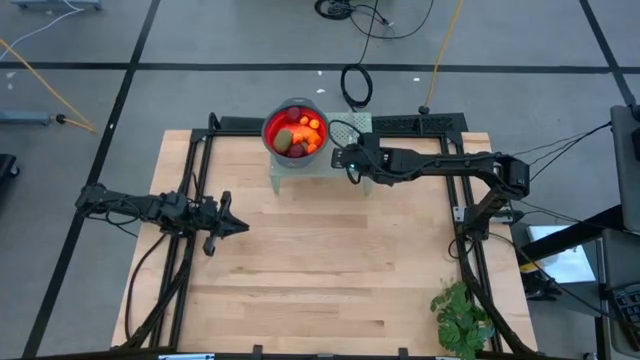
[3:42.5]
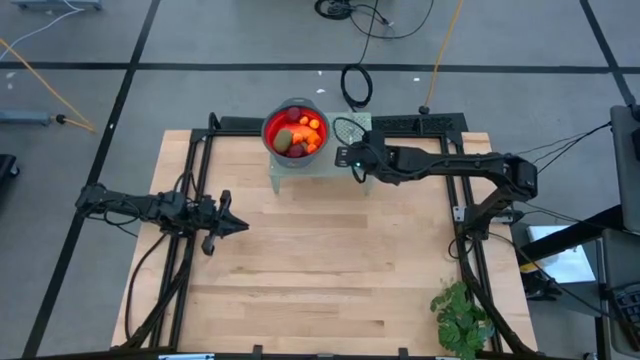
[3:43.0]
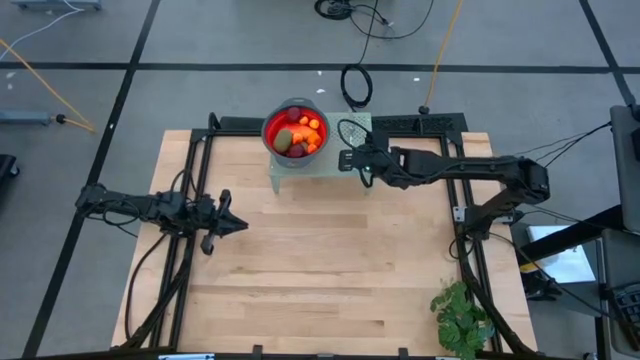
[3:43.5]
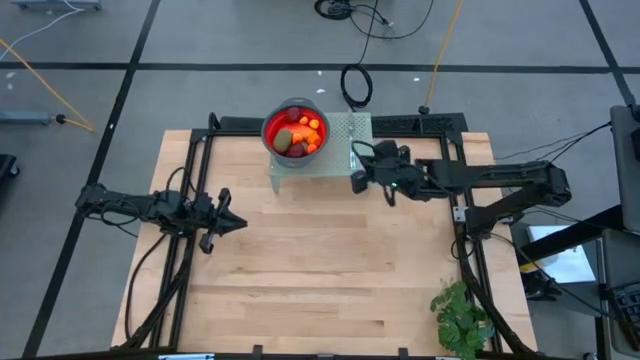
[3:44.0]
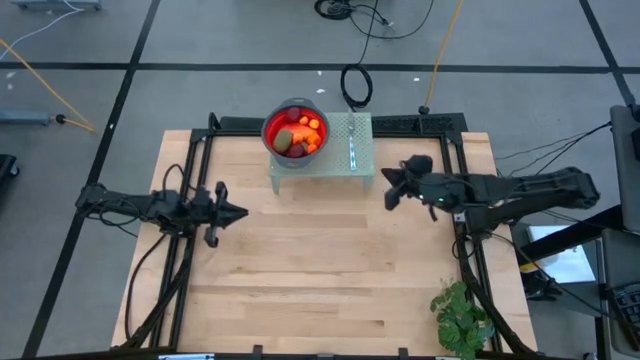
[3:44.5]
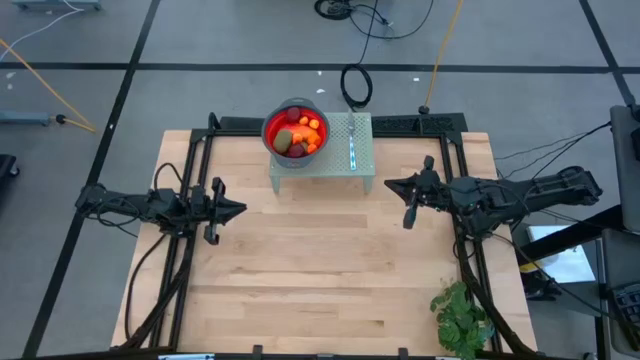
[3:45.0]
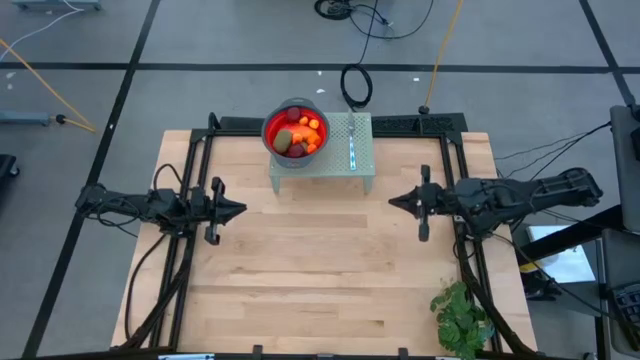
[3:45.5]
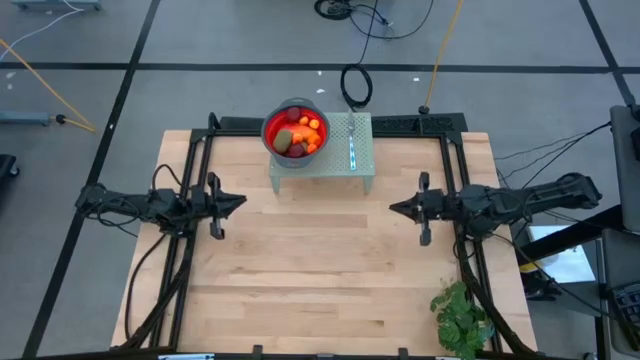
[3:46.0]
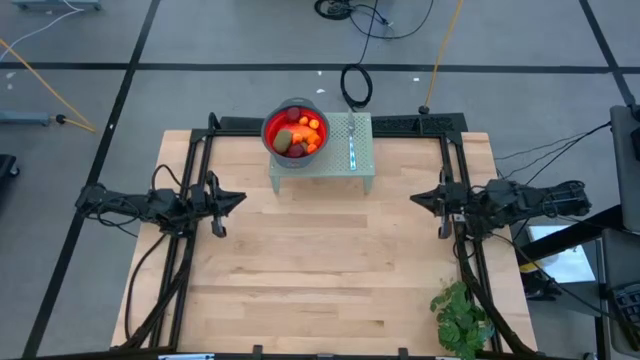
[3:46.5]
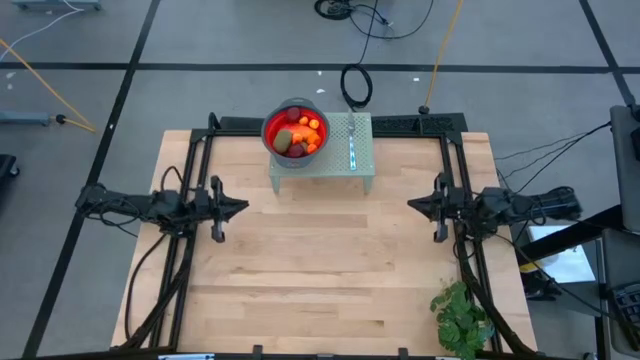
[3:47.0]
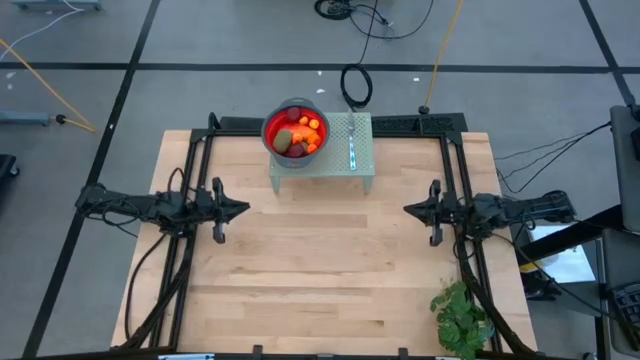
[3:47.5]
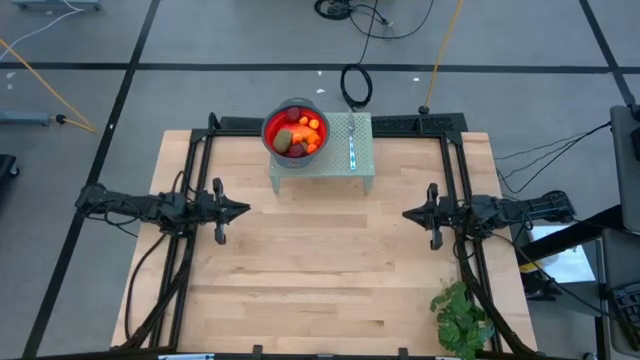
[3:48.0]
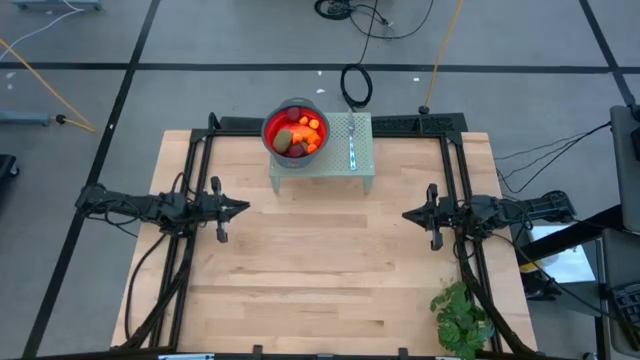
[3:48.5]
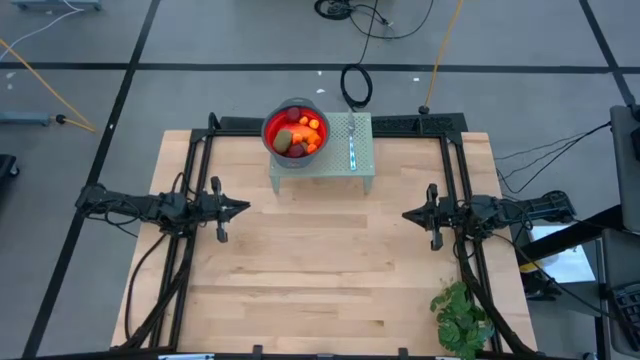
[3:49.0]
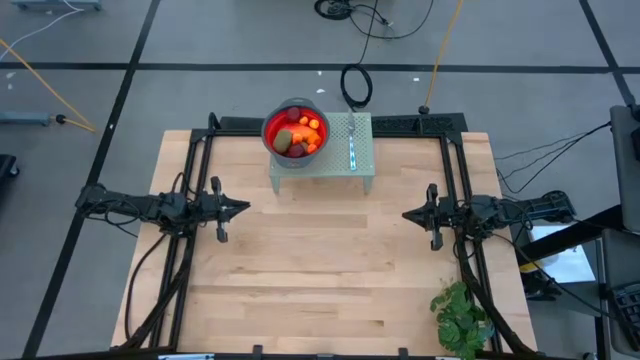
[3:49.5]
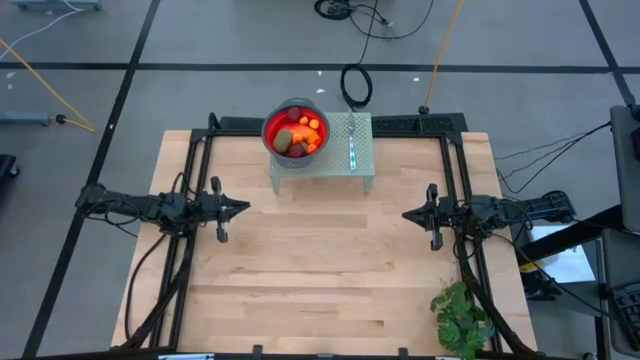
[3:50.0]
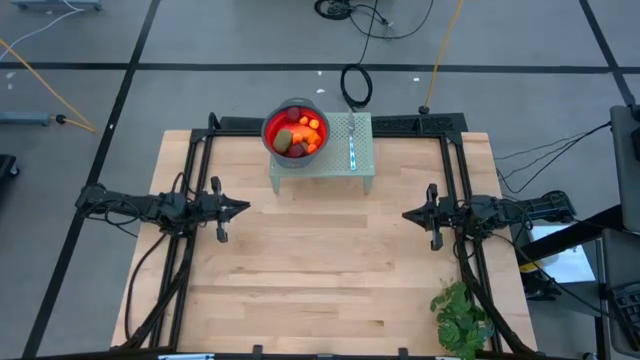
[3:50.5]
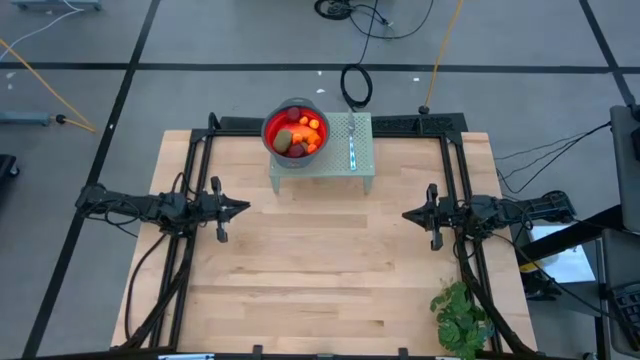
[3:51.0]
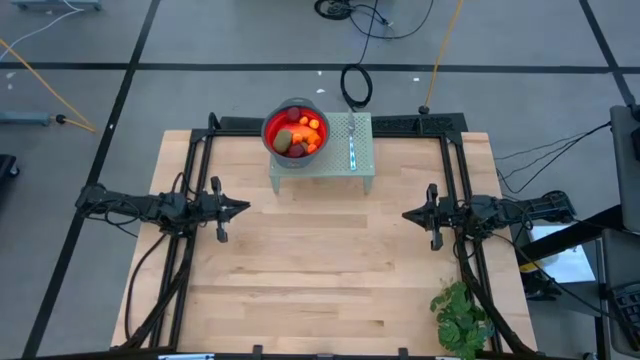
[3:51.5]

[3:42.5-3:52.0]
Task: Pick & Place Fruit
Return to Home Position

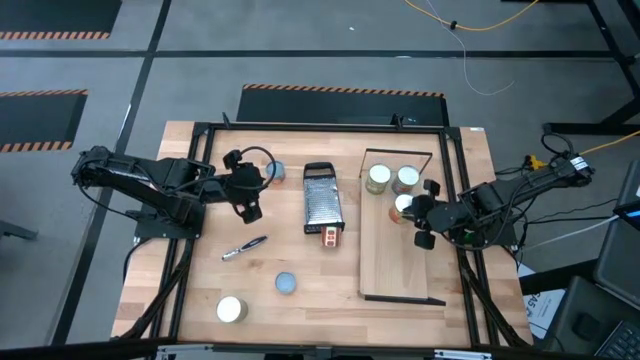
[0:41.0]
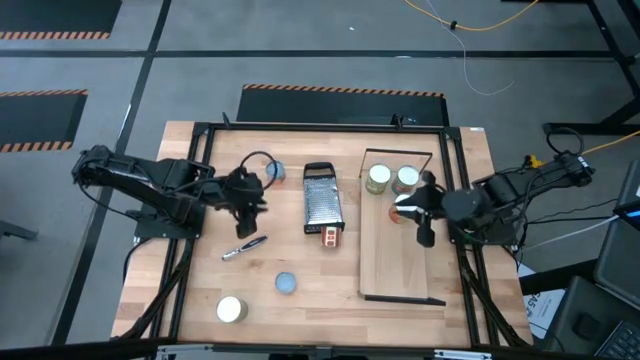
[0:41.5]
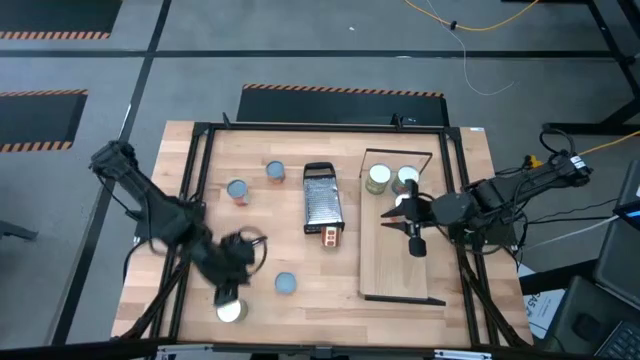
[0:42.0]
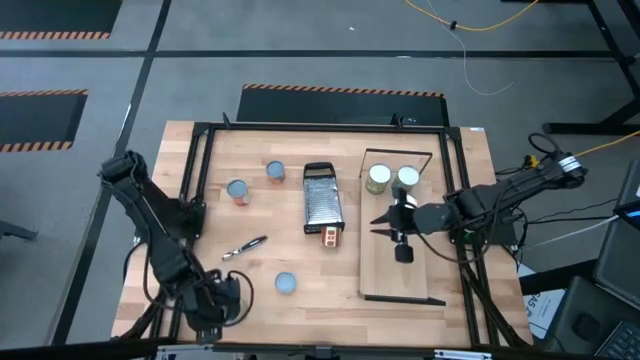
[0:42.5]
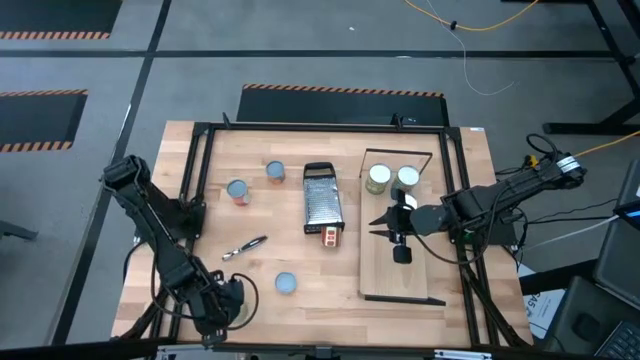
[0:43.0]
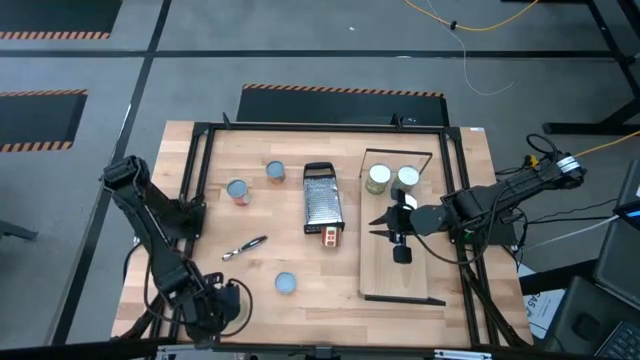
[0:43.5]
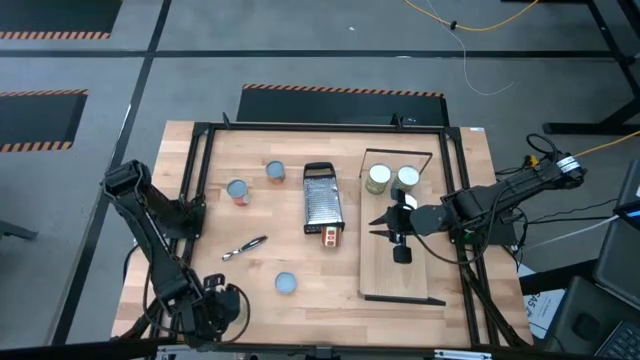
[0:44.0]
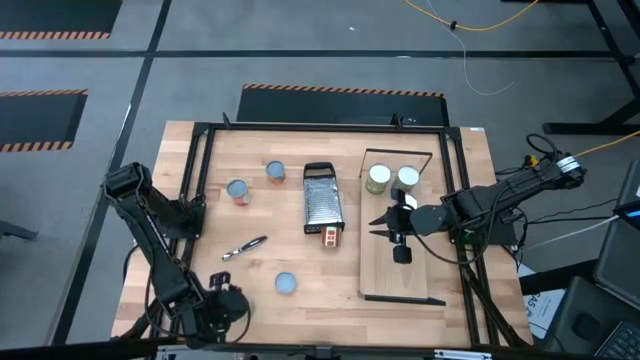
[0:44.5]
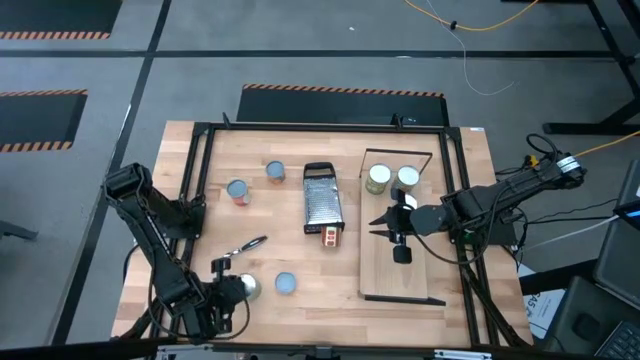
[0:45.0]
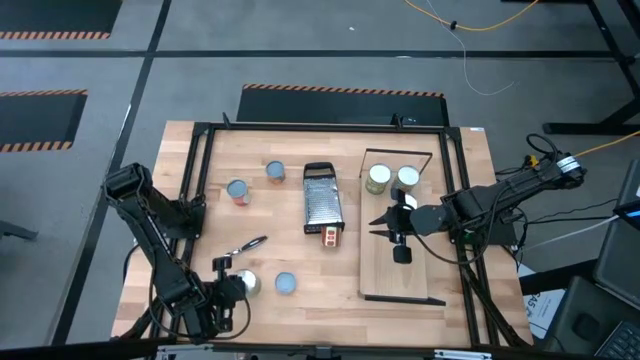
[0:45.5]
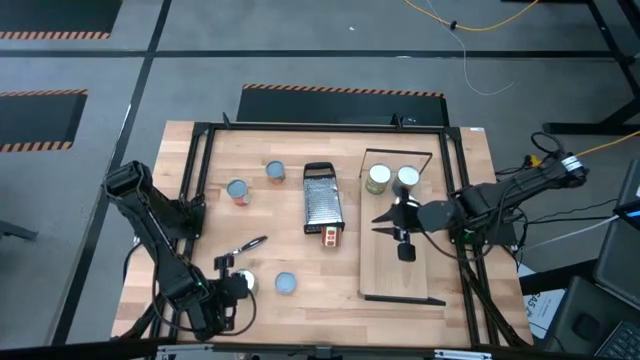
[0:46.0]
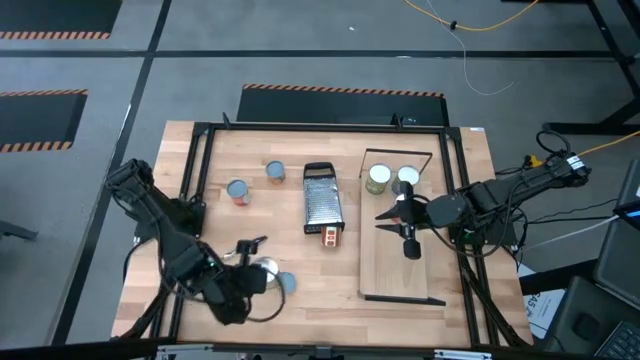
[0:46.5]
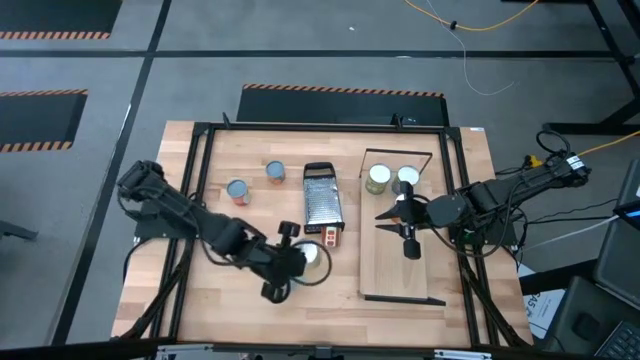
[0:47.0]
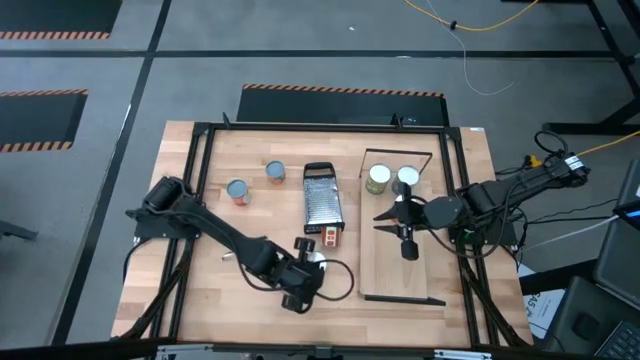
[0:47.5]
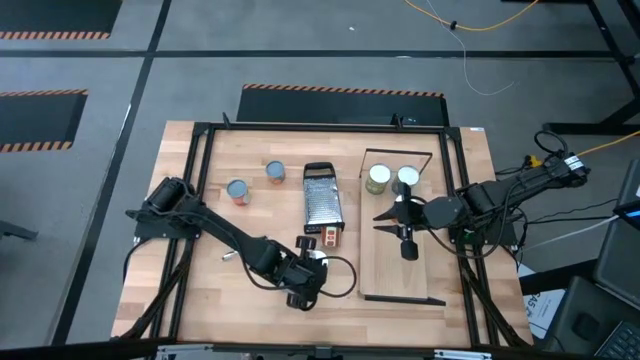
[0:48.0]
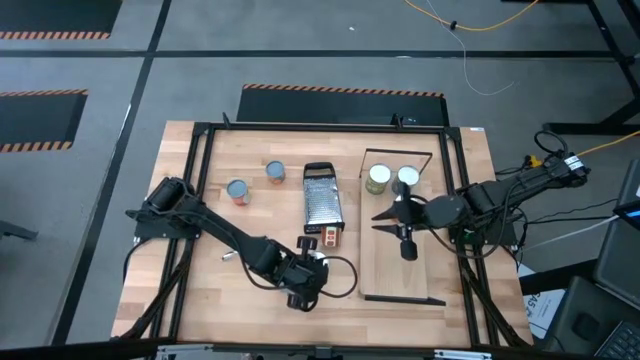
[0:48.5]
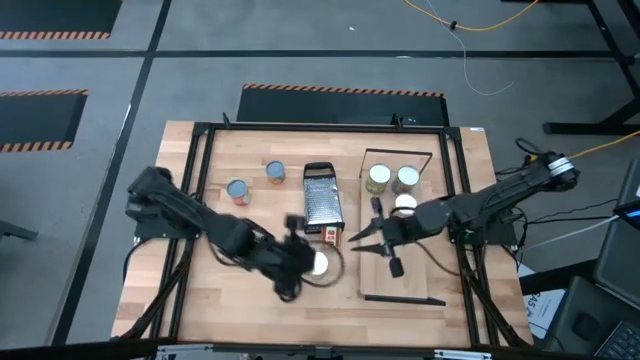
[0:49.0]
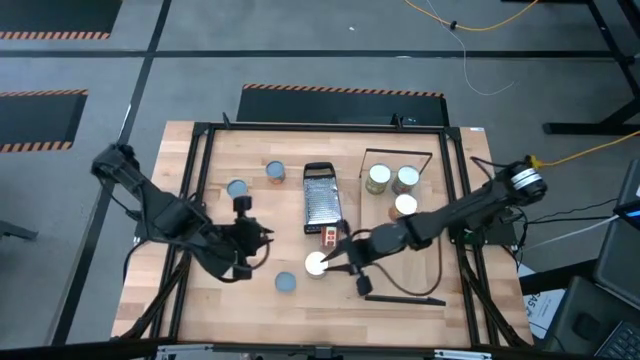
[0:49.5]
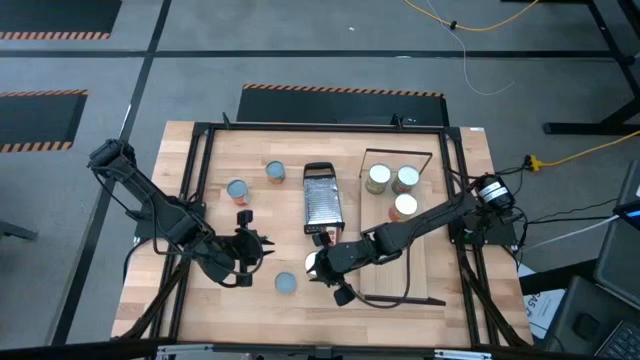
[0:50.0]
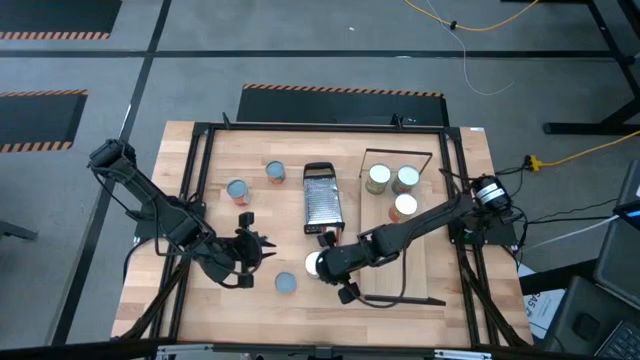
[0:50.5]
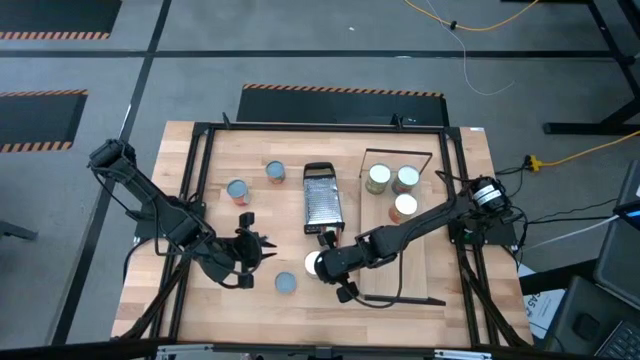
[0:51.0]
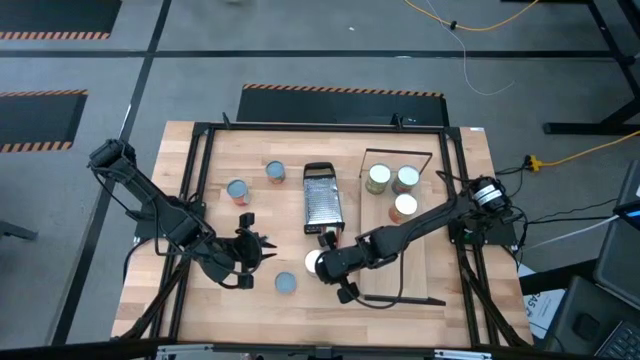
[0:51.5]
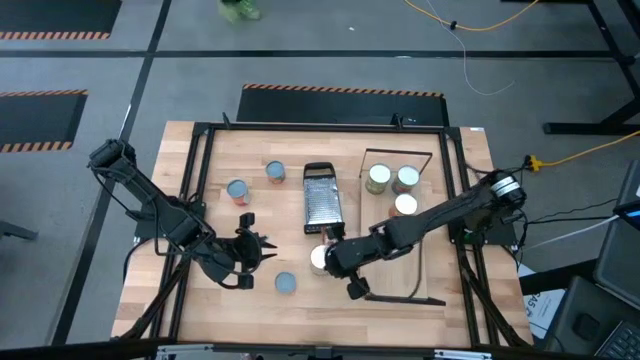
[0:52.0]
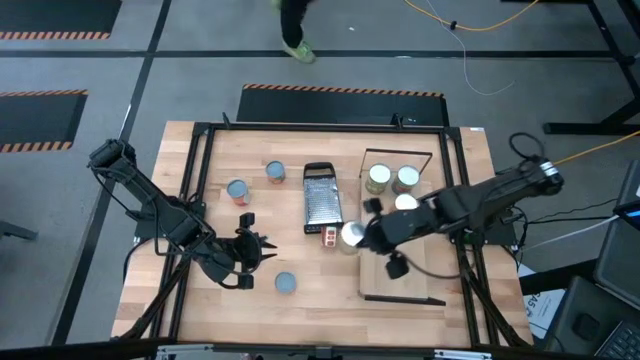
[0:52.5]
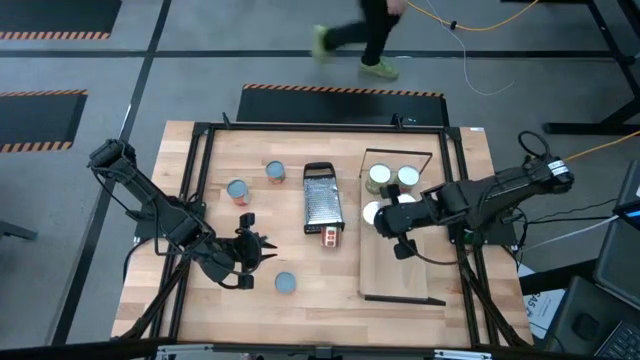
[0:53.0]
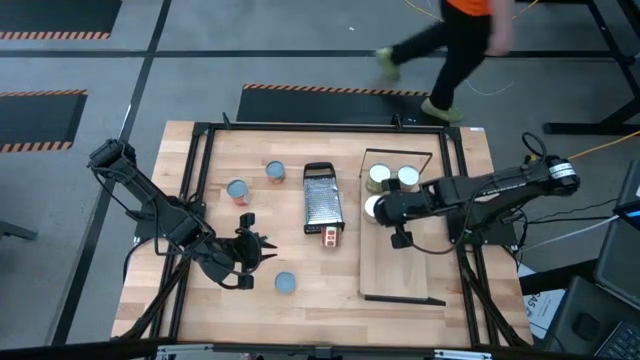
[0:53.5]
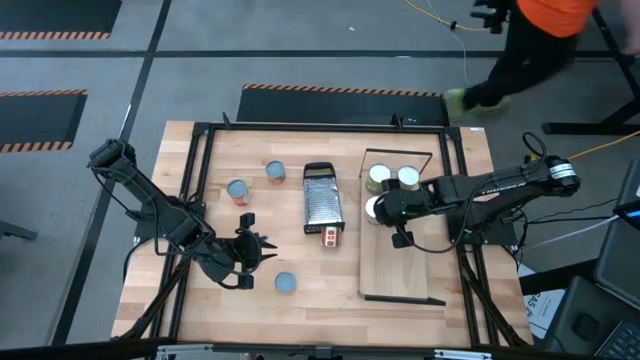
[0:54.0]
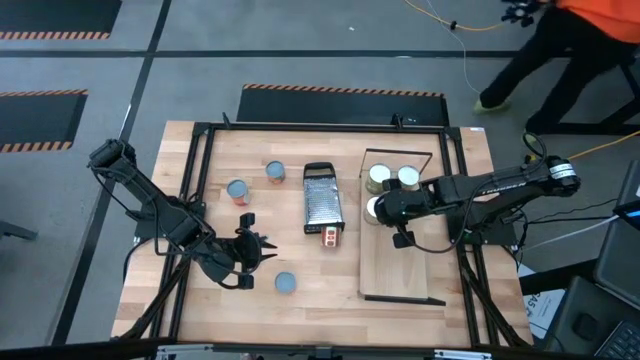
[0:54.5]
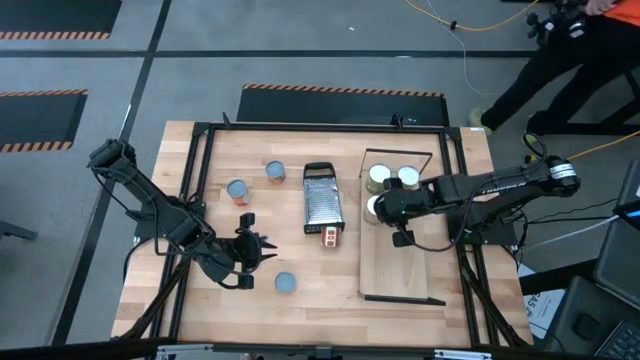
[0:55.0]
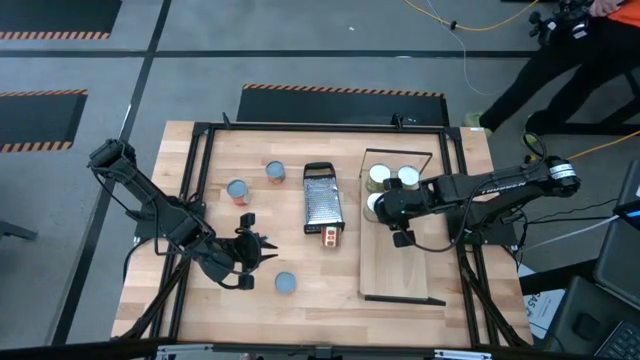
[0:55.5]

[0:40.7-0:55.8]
Task: Pick and place cans onto a shelf
Put the canned oranges on the shelf
